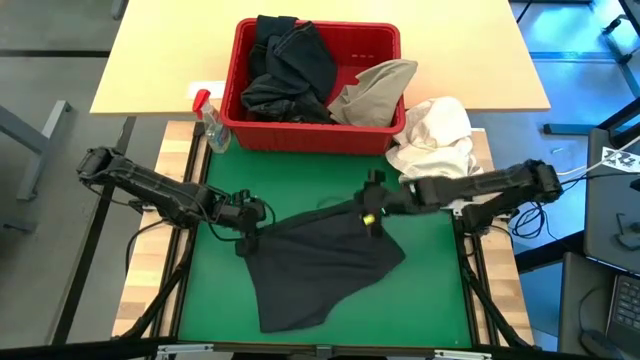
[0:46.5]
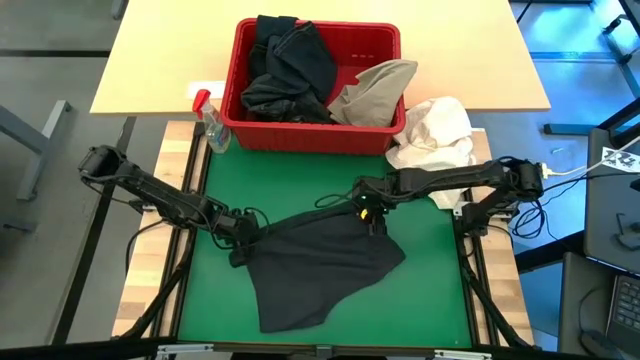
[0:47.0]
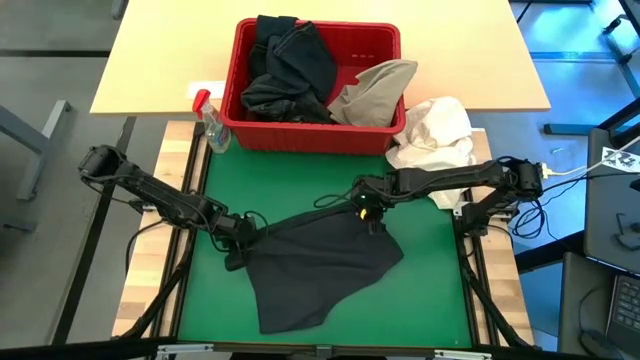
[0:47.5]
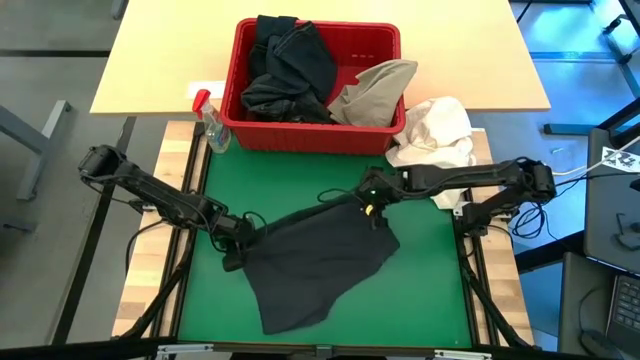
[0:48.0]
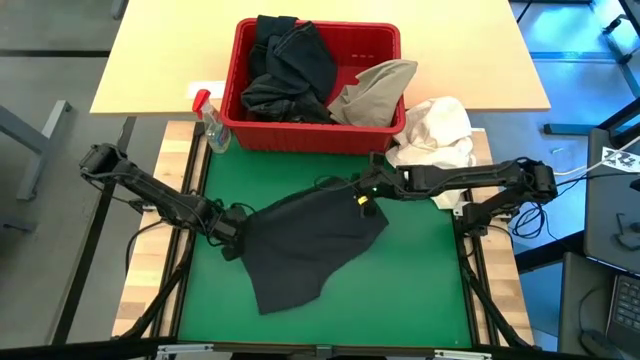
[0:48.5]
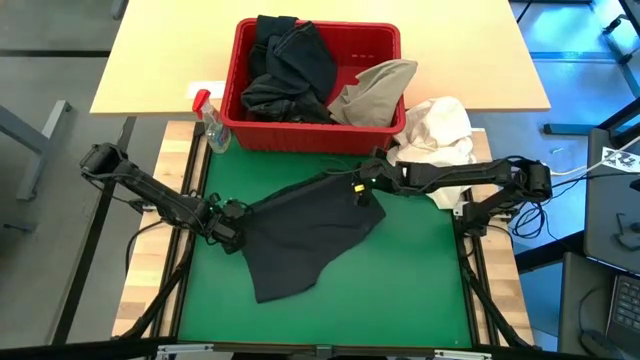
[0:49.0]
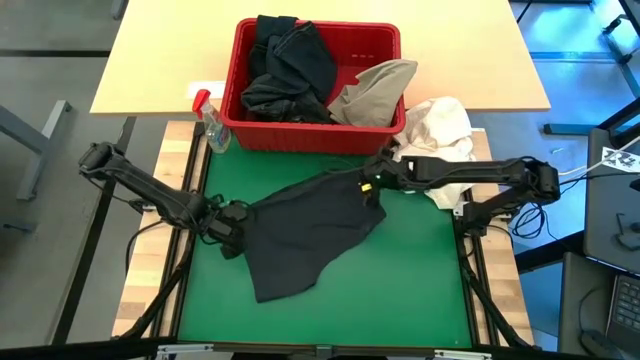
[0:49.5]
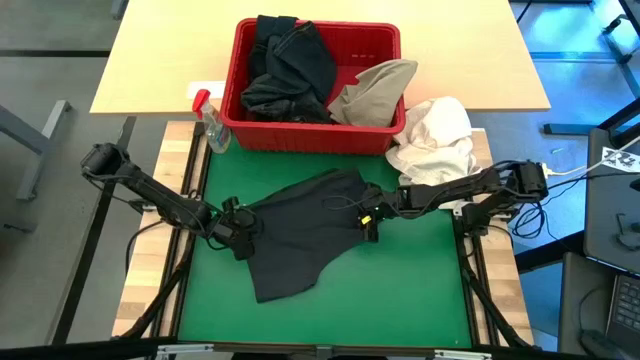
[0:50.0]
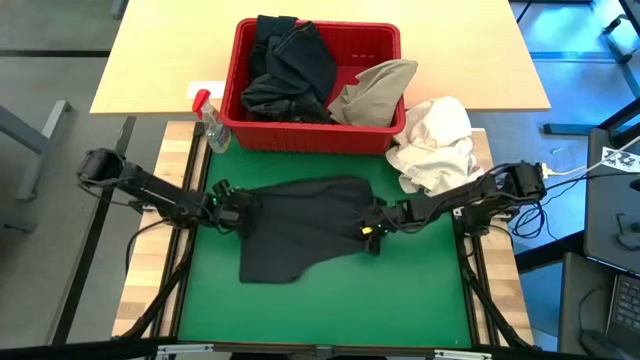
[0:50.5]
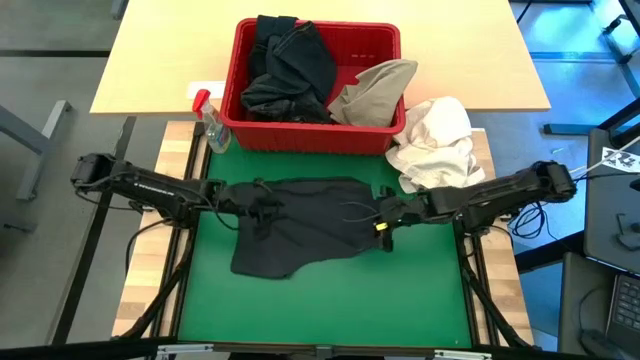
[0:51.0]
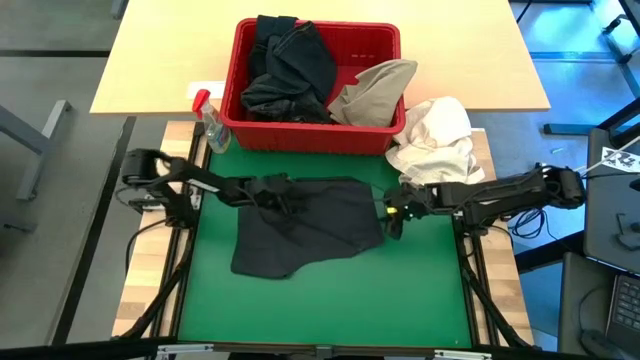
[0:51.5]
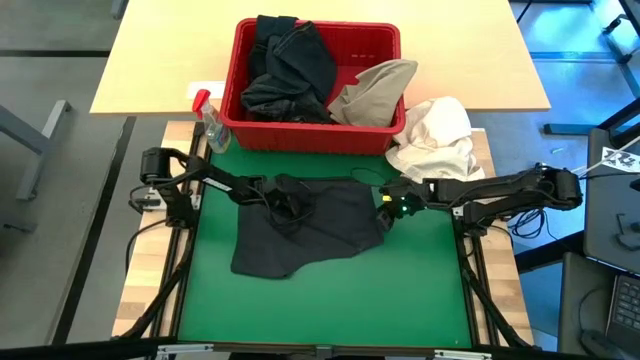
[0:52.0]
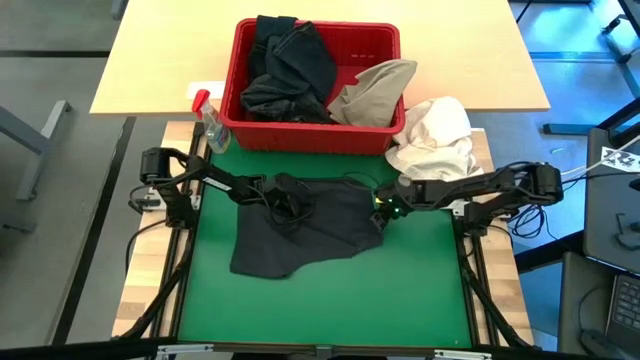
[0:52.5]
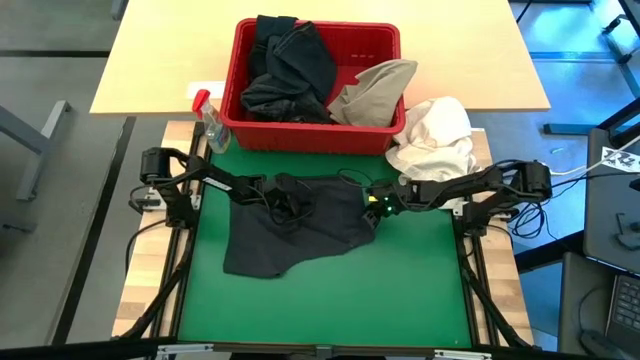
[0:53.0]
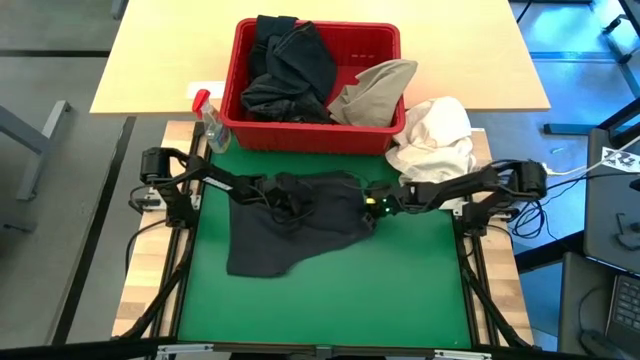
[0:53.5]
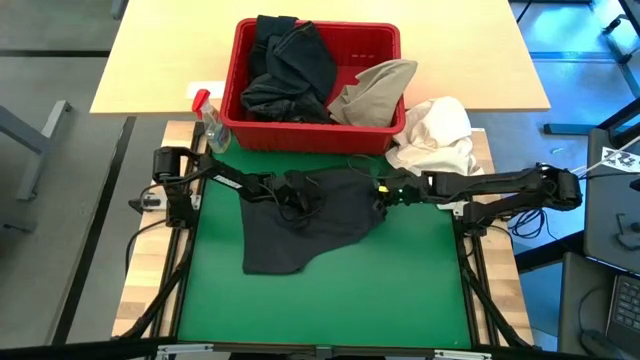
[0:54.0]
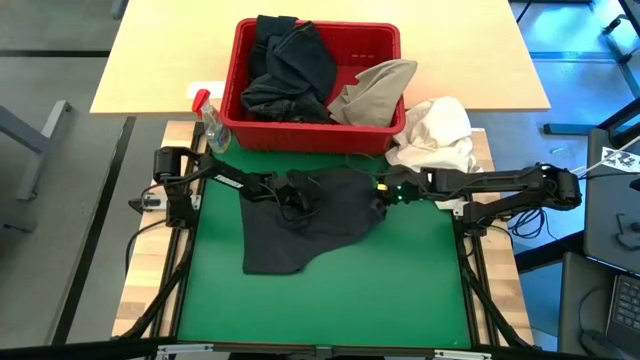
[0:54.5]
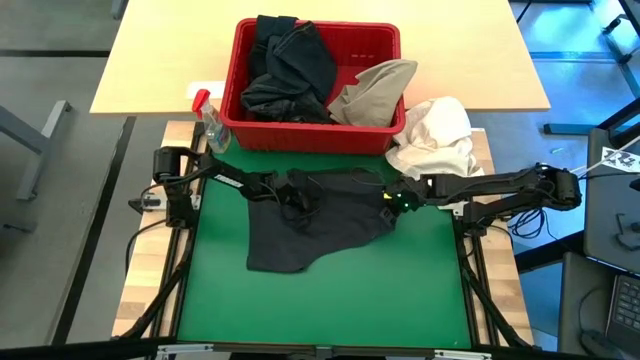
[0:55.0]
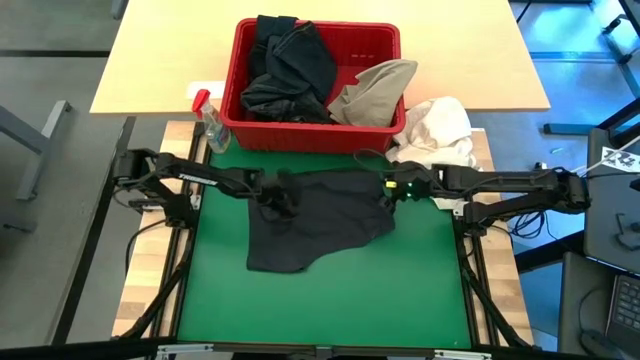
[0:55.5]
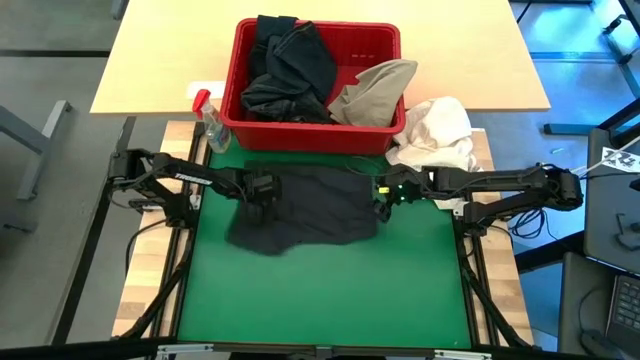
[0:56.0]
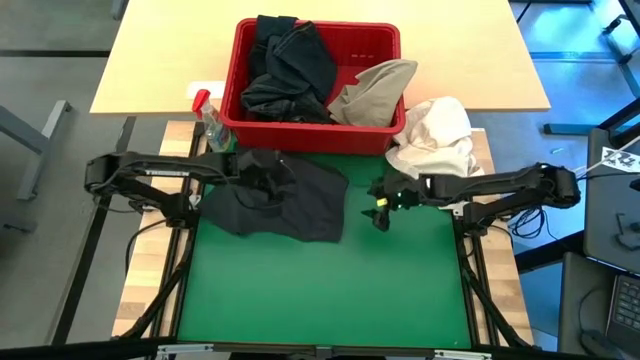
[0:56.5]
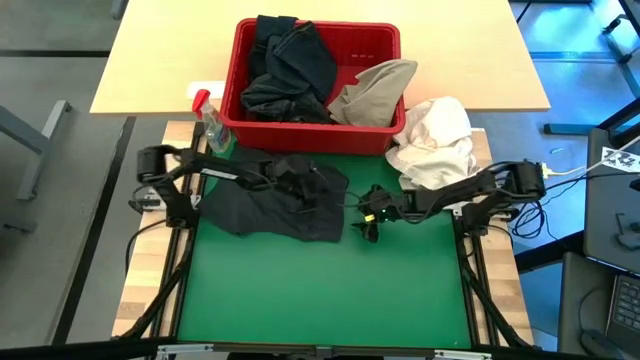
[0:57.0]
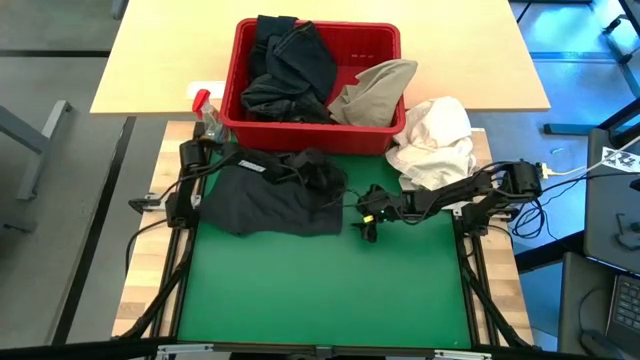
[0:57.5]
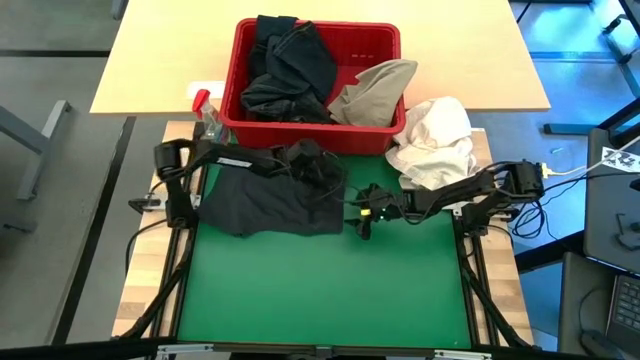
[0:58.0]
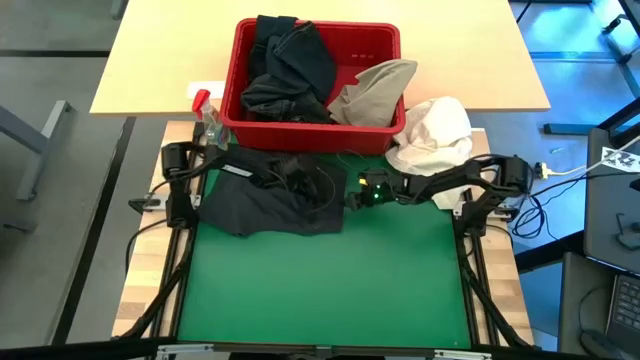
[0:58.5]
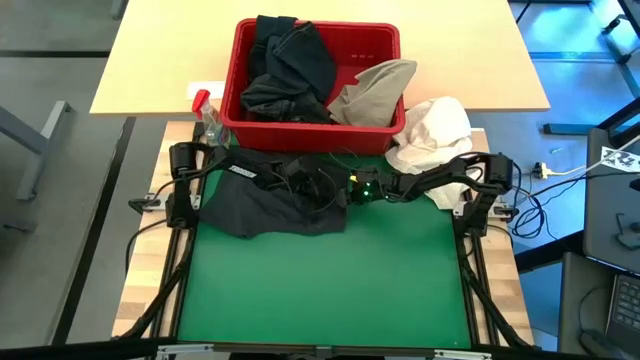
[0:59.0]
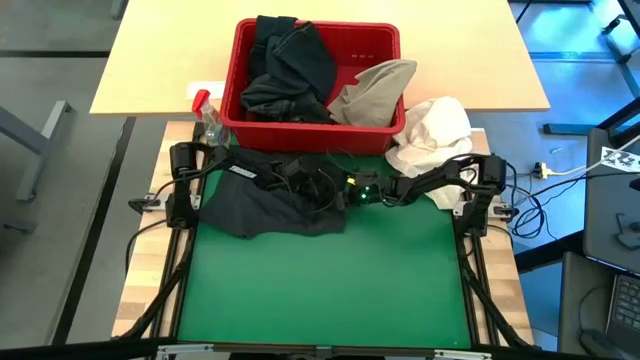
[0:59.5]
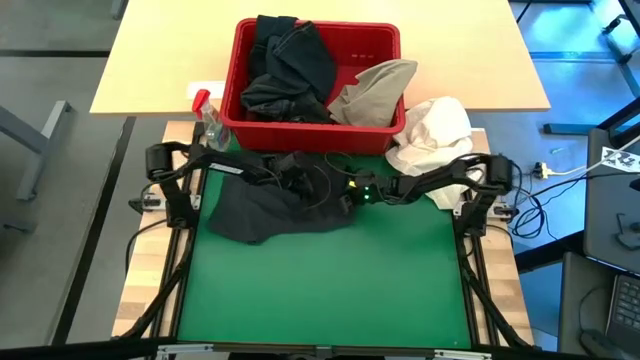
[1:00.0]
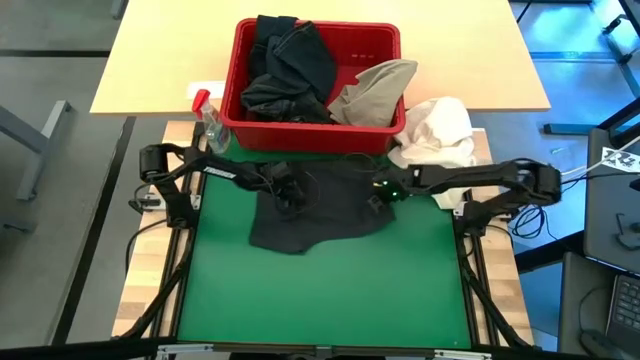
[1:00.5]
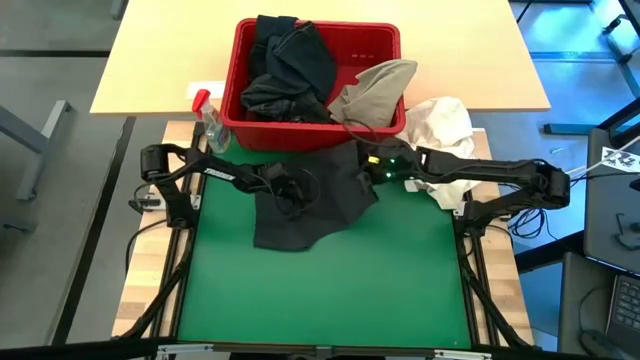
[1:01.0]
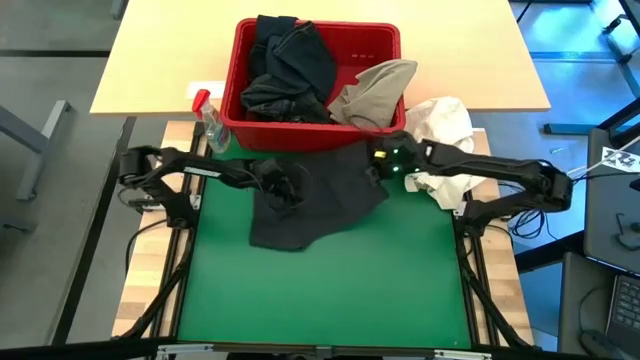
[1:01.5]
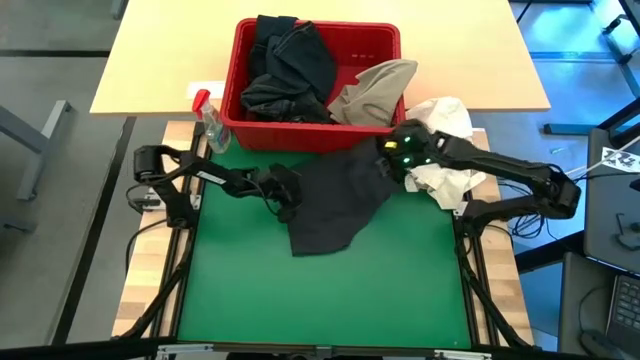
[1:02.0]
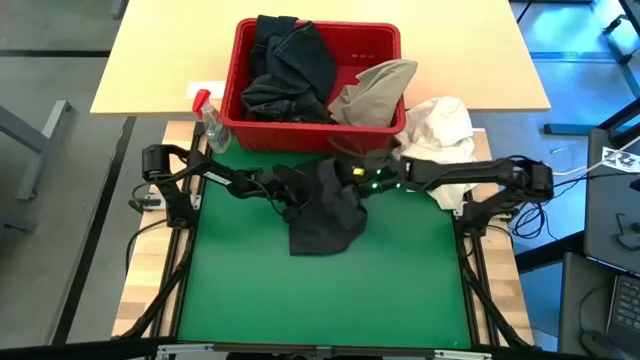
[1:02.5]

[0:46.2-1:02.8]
Task: Fold Laundry from Bin
Fold the black shorts

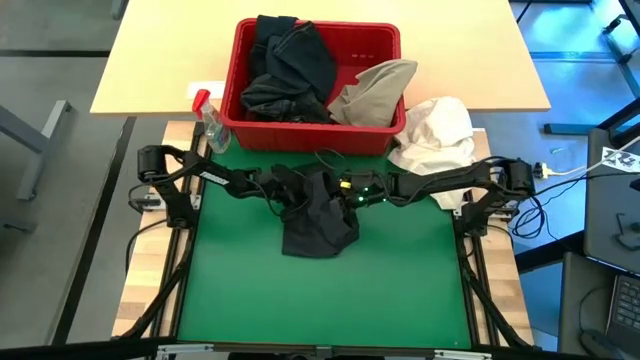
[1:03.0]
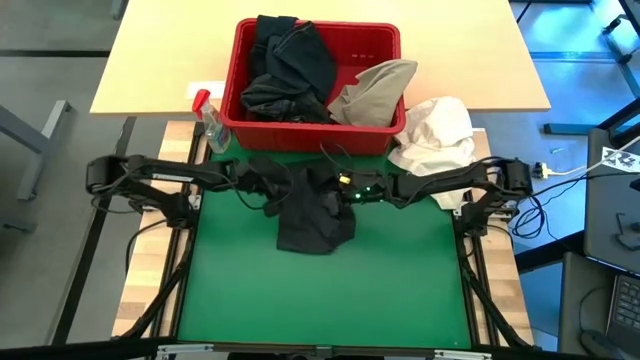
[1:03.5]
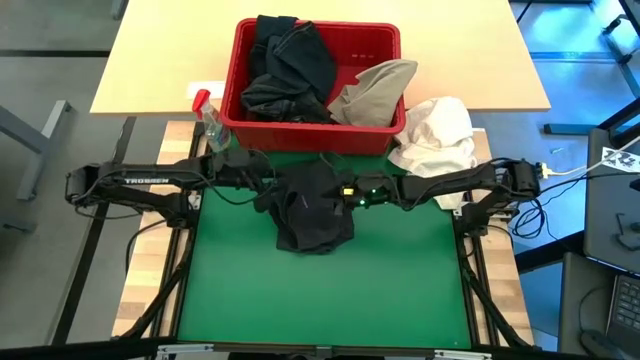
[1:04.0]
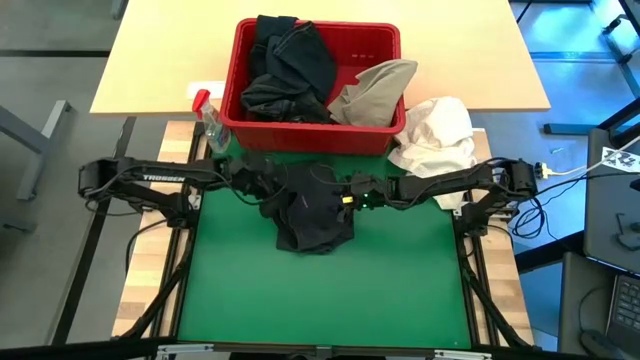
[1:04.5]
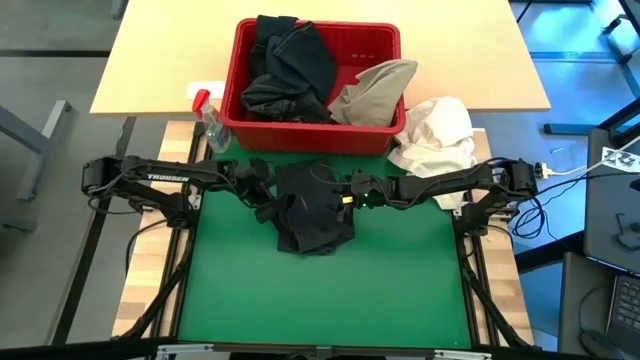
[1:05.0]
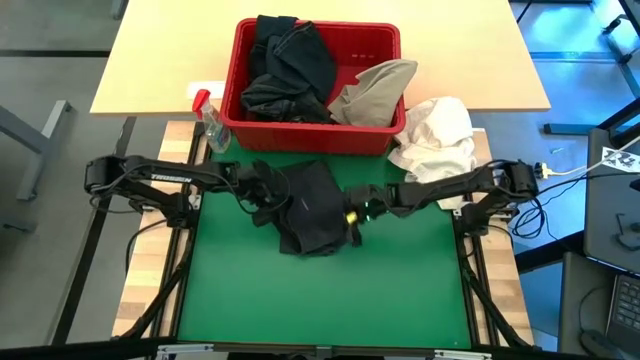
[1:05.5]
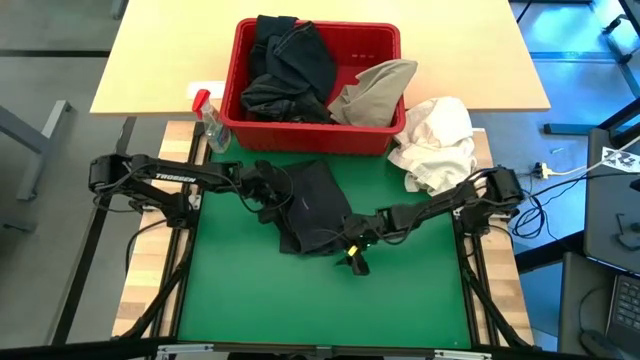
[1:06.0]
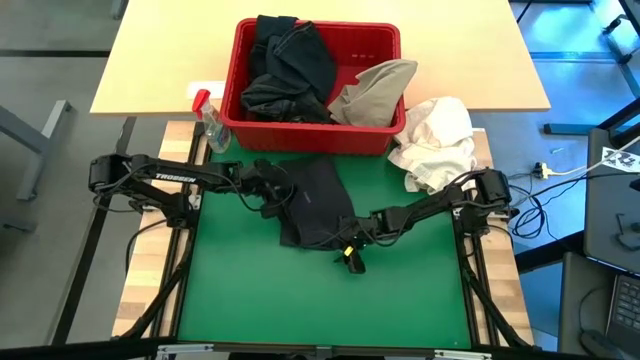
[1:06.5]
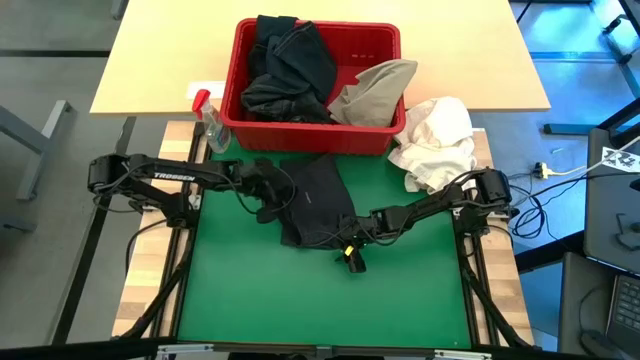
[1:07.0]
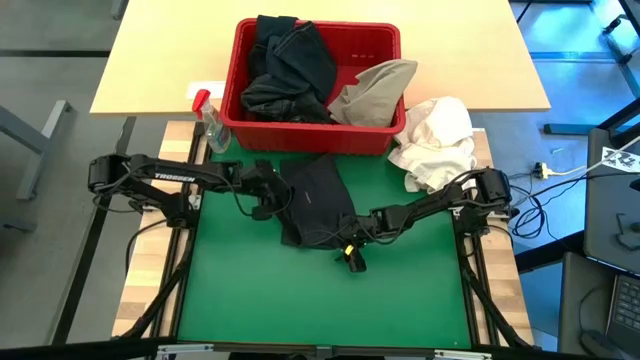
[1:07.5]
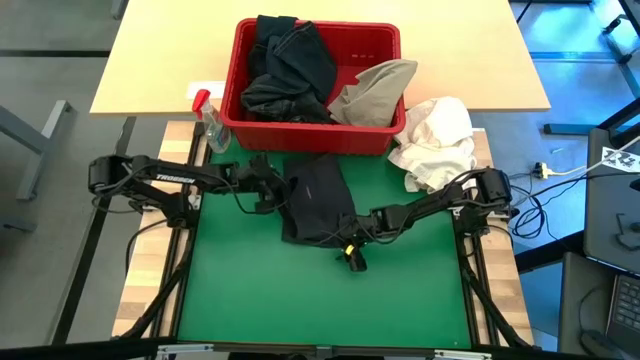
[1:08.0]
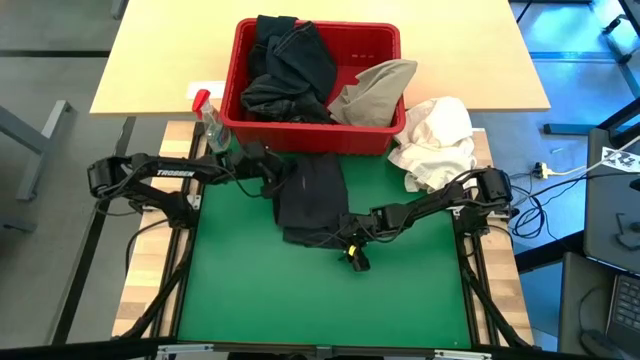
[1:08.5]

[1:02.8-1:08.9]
Fold the black shorts
